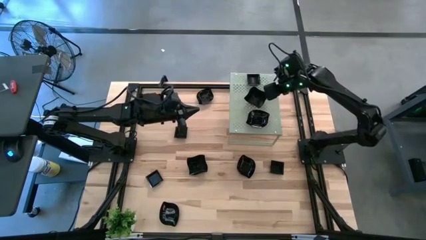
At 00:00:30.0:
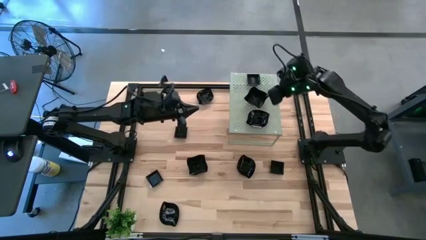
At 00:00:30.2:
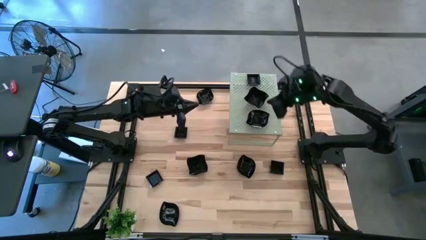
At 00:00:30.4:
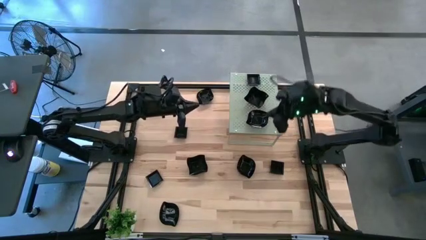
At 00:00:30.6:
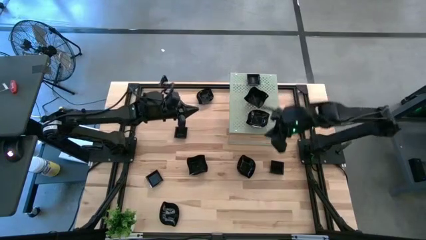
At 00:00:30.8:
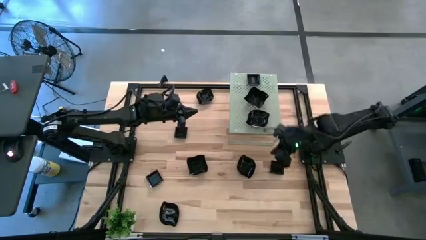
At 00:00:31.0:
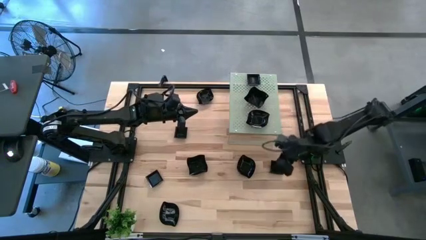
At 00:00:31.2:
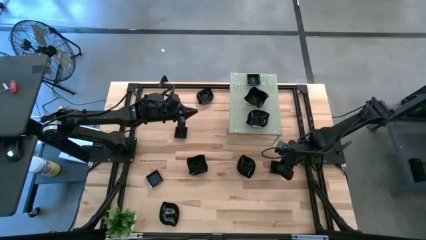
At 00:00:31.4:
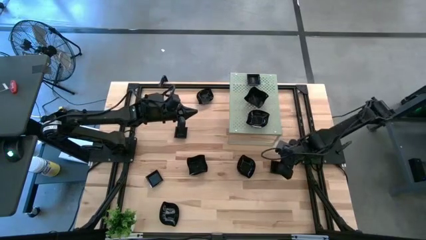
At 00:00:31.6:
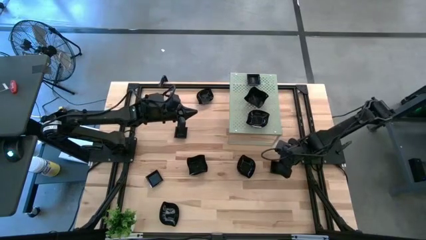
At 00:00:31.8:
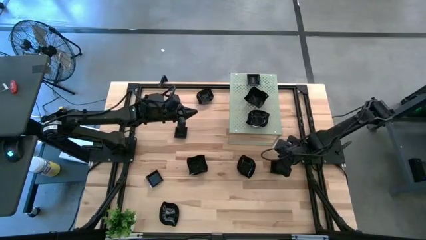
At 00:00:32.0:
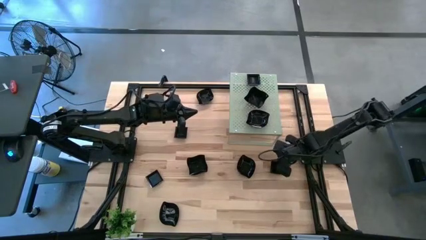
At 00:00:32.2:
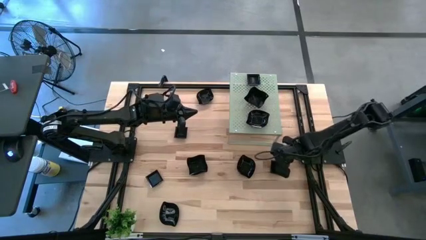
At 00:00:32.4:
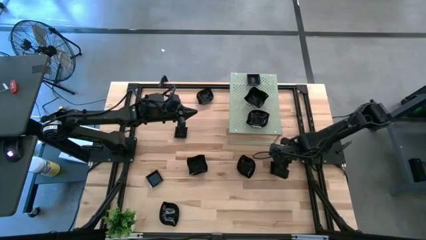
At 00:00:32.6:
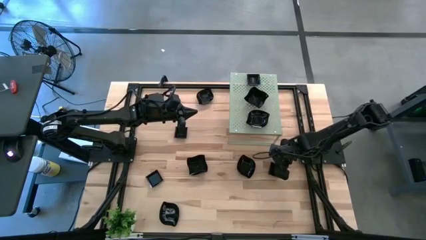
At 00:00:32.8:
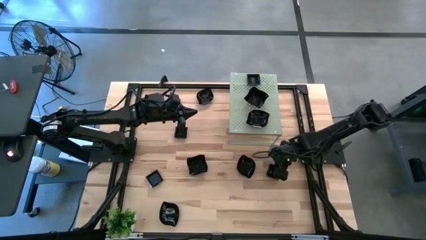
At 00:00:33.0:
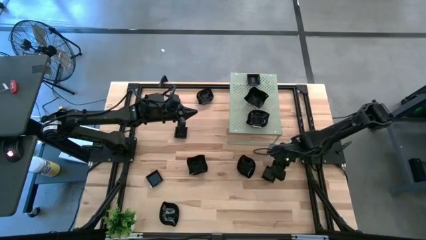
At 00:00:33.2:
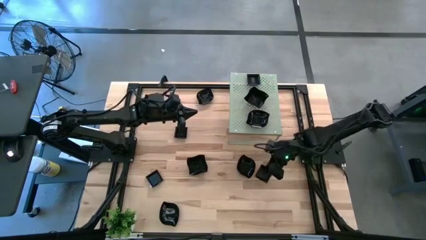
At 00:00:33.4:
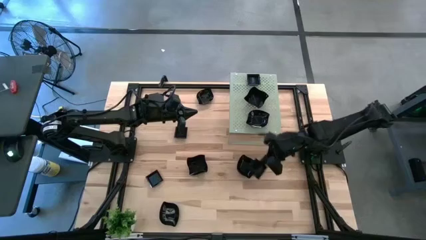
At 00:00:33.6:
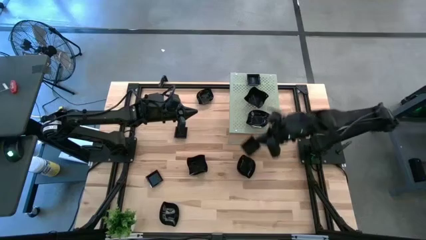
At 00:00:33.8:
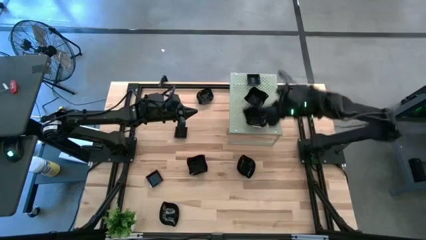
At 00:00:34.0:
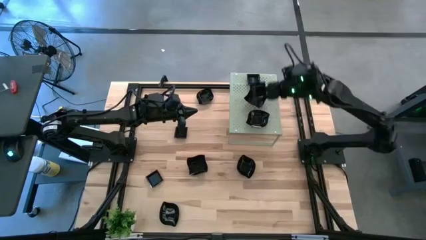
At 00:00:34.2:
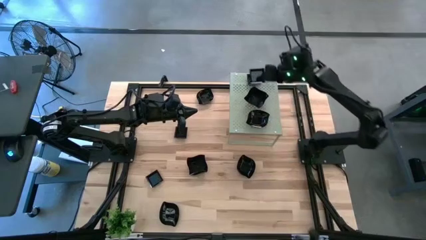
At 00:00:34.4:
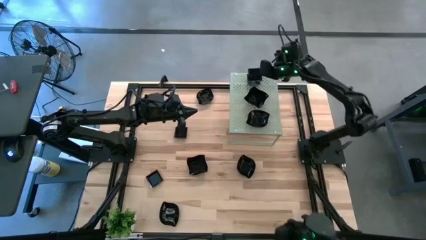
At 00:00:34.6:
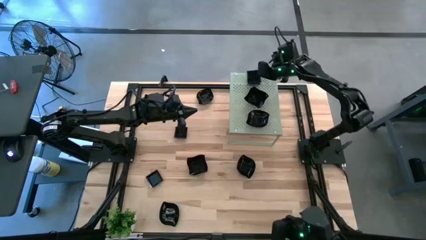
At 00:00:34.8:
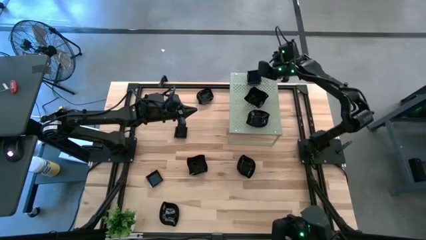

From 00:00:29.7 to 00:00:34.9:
Task: Pick & Place Mini shaped plates
Stack the black square plate on the black square plate on the shelf

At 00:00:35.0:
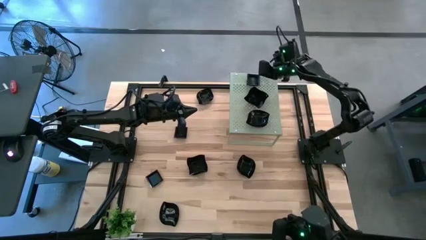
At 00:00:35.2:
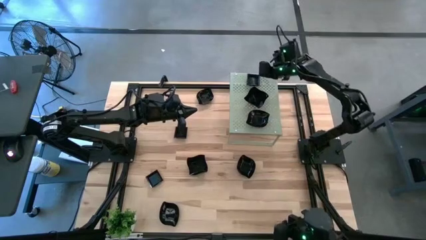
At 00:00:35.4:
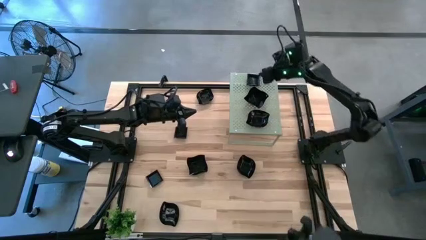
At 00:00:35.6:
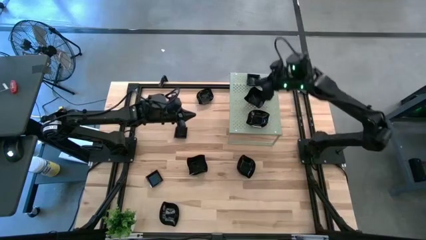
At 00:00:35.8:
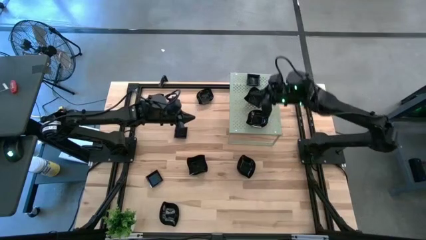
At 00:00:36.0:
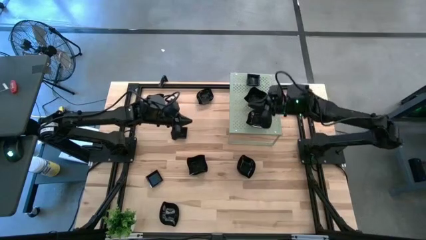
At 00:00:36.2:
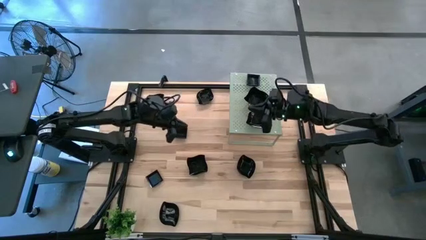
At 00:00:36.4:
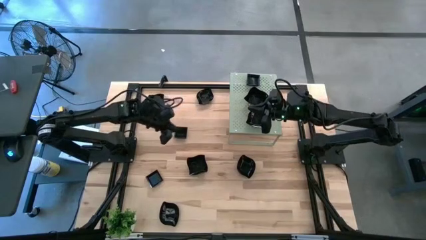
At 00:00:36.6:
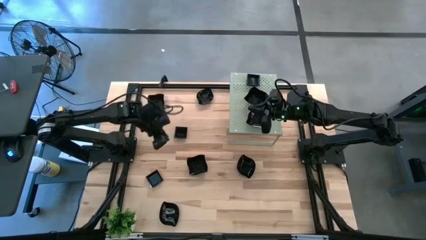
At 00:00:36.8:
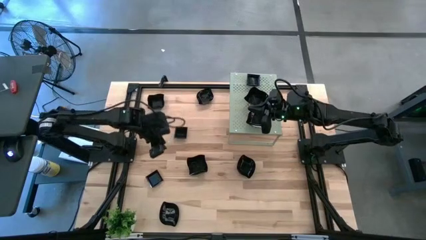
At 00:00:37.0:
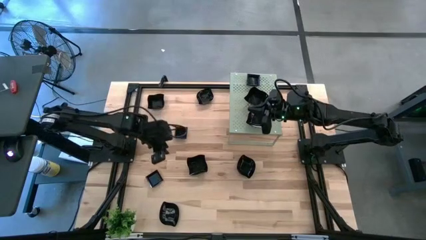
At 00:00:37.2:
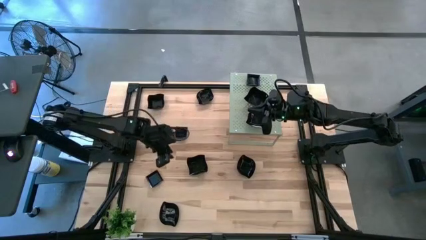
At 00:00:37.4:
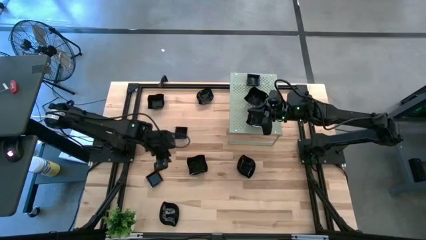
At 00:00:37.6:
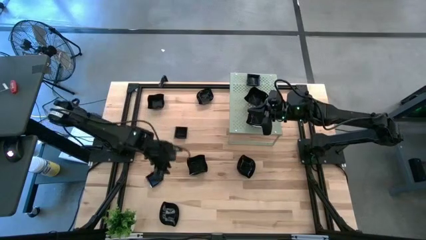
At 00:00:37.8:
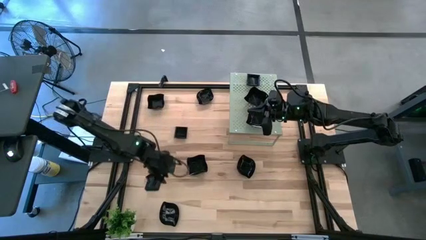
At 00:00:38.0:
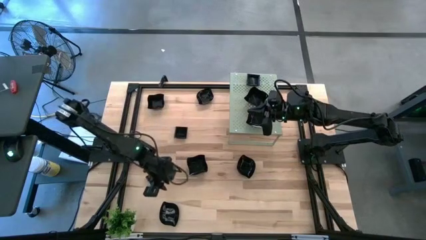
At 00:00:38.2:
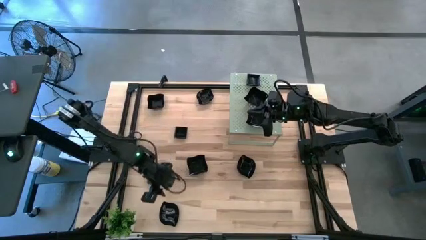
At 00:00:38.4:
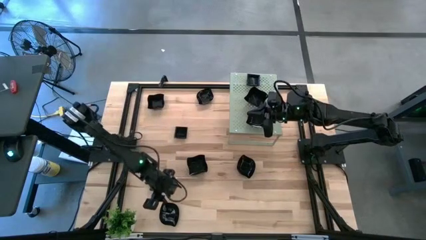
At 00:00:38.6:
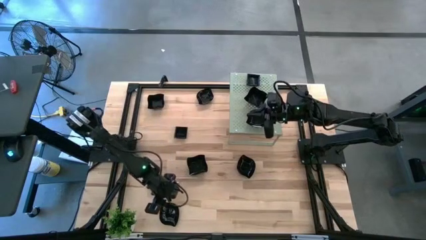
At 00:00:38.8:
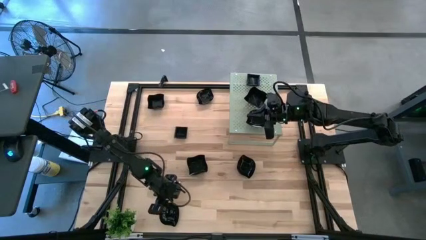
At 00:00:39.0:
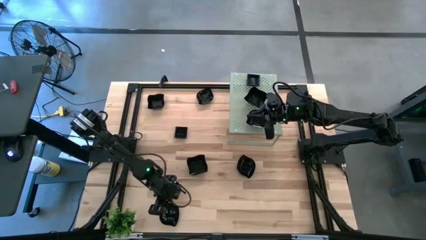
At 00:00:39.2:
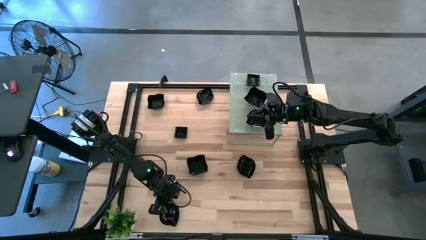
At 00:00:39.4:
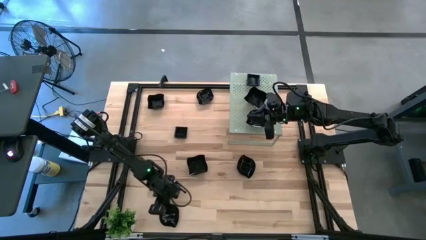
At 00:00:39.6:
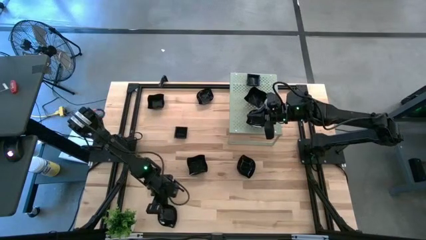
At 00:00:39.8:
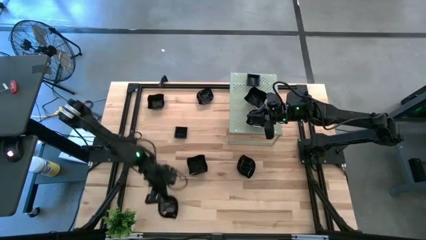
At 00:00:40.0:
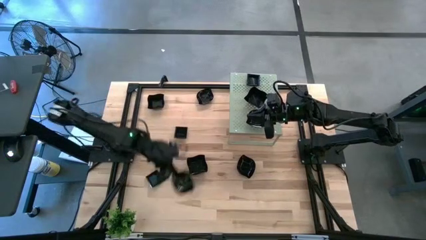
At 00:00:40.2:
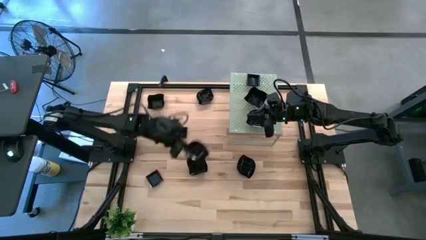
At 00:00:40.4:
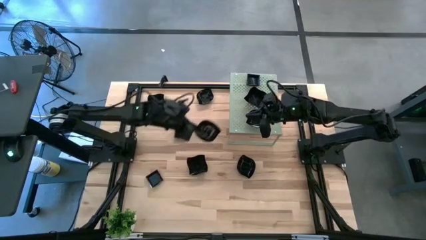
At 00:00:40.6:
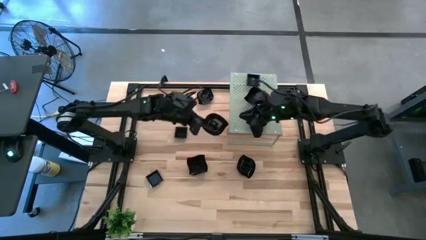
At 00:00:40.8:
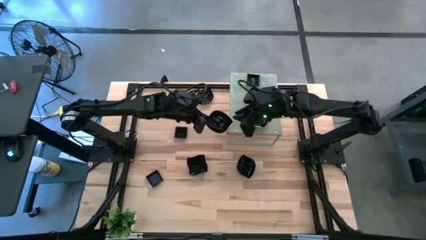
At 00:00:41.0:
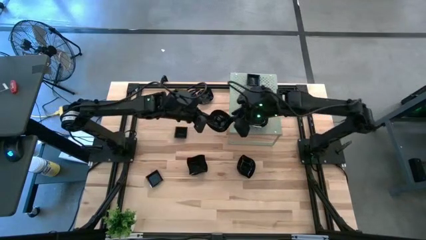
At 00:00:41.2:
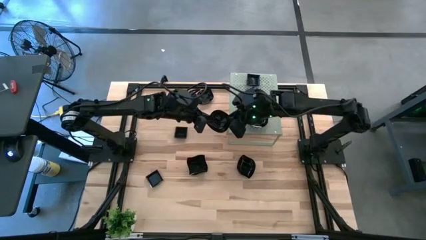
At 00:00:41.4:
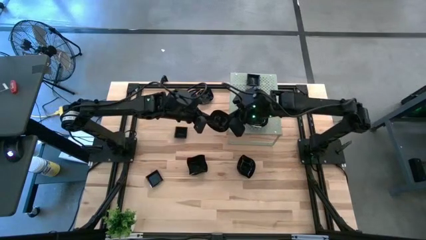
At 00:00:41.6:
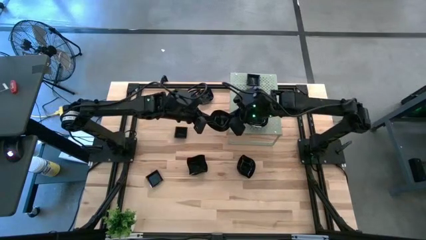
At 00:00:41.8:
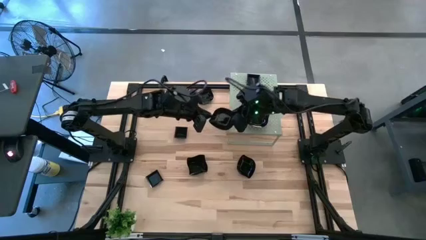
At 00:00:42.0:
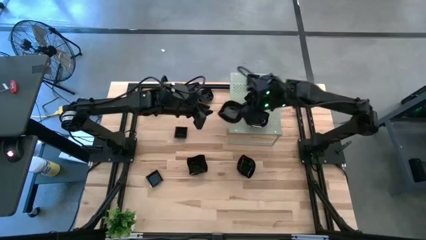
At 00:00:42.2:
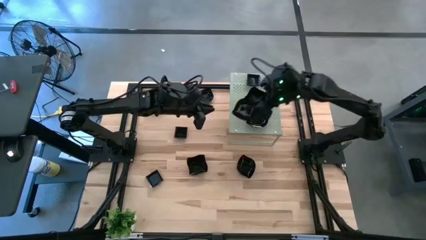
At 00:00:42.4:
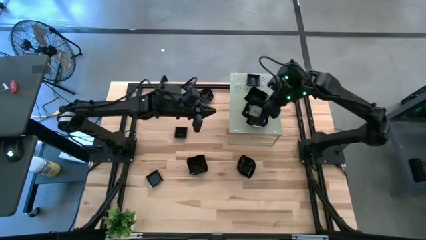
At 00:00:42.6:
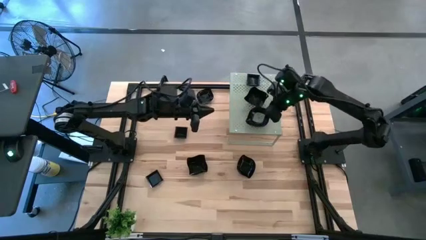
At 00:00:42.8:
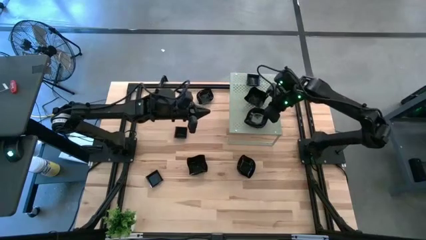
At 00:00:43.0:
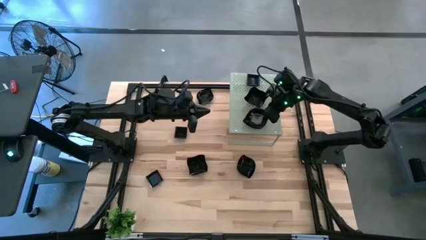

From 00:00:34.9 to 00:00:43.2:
Stack the black leaf-shaped plate on the black leaf-shaped plate on the shelf

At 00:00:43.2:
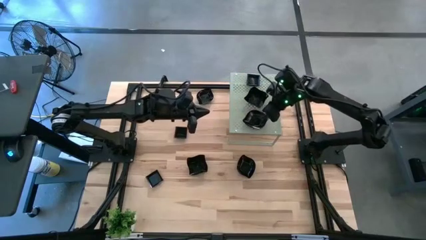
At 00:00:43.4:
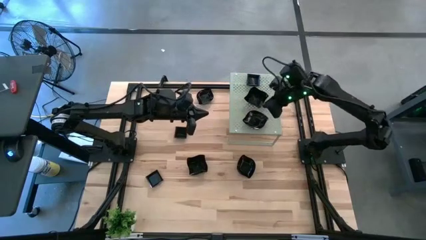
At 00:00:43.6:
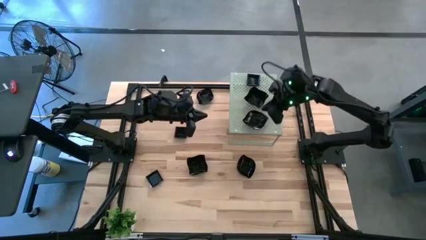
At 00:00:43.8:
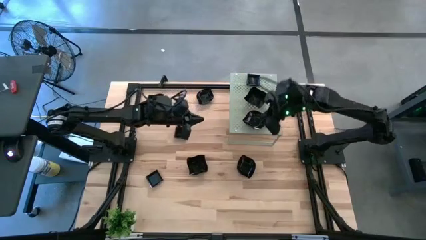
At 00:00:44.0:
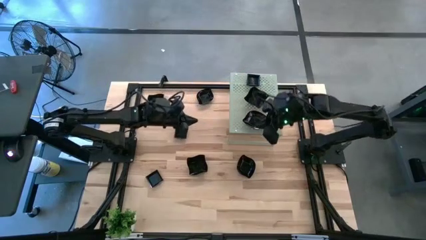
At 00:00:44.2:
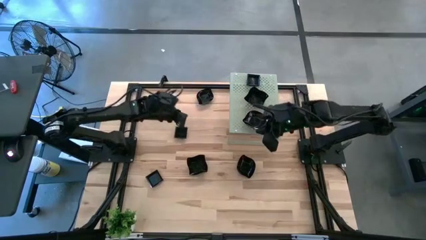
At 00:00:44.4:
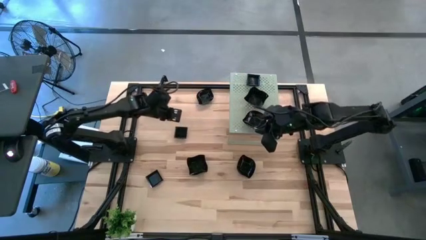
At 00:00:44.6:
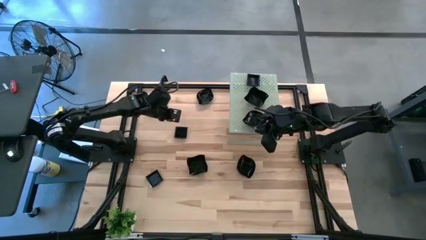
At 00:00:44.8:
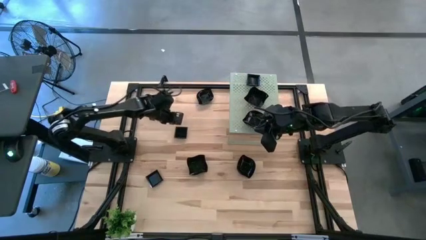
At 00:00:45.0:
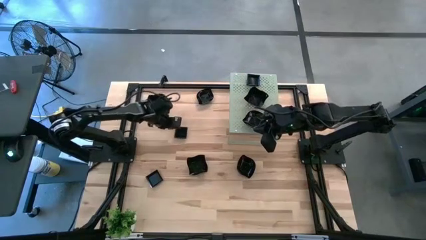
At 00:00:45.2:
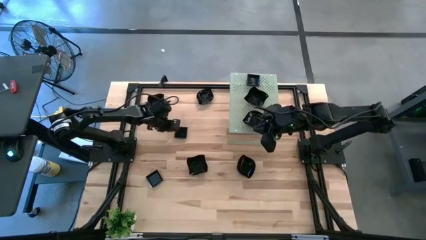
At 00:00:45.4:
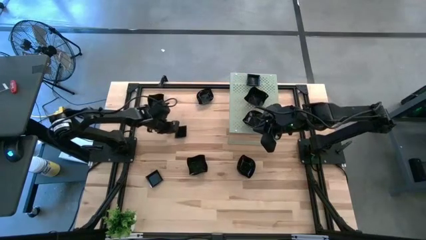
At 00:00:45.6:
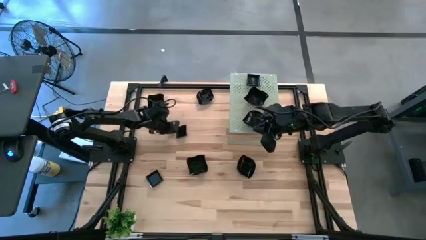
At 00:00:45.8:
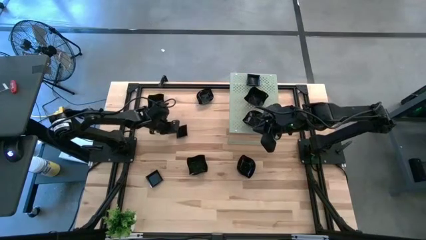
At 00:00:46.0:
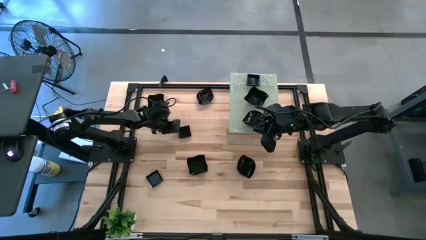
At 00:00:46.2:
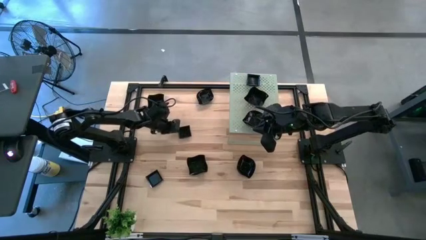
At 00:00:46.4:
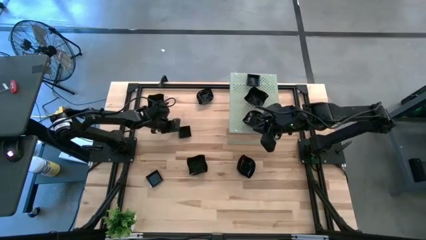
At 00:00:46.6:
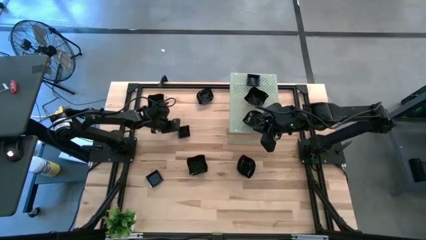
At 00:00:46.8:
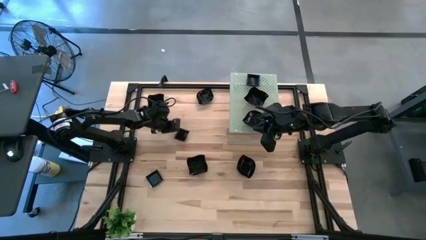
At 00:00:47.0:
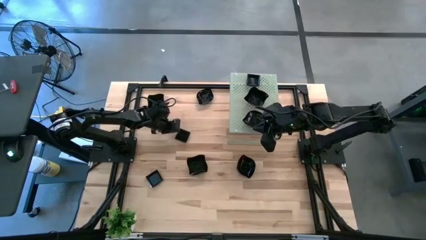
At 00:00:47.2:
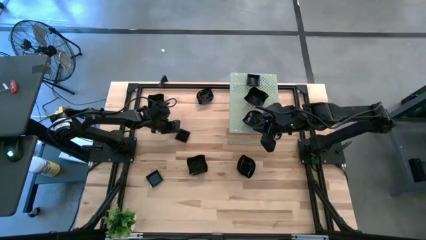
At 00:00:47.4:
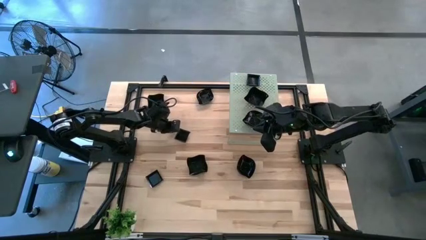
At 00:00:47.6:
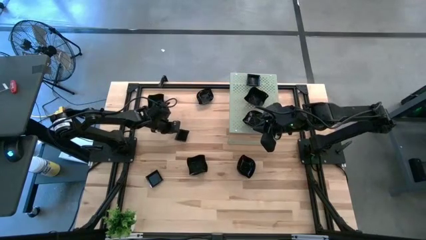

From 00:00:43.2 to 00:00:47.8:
Stack the black square plate on the black square plate on the shelf
